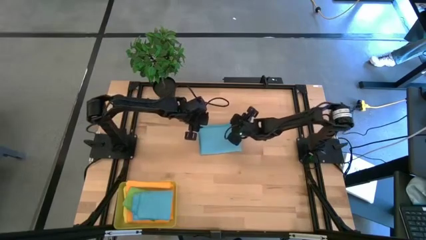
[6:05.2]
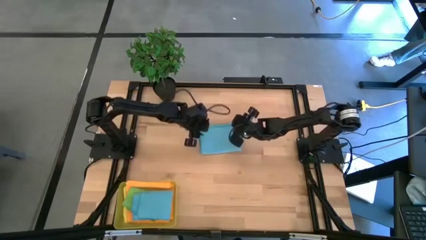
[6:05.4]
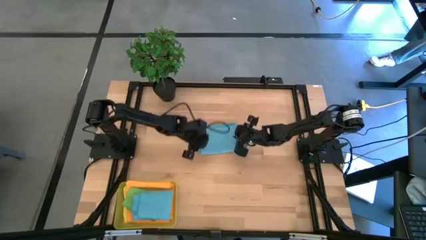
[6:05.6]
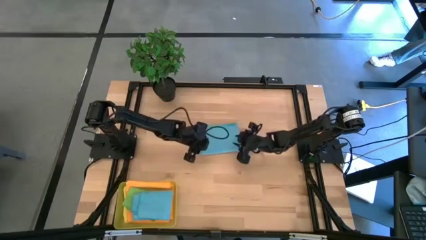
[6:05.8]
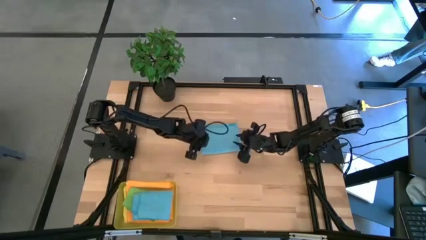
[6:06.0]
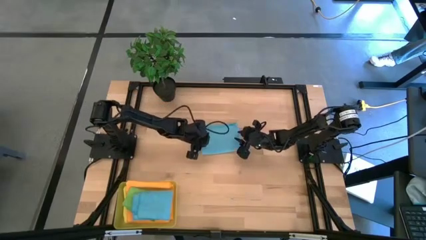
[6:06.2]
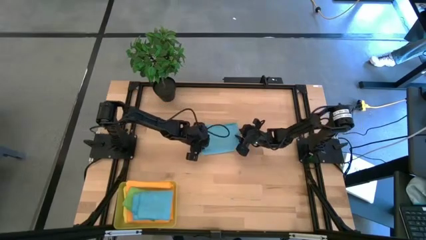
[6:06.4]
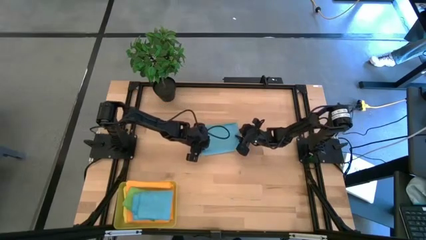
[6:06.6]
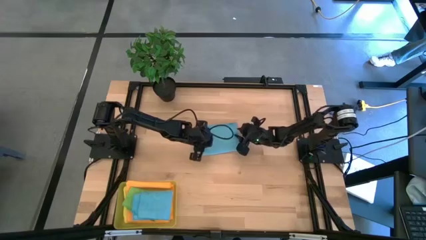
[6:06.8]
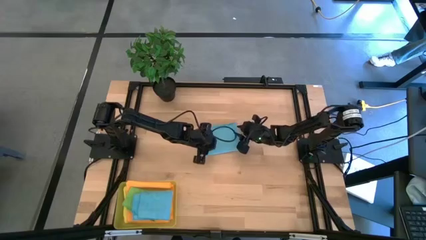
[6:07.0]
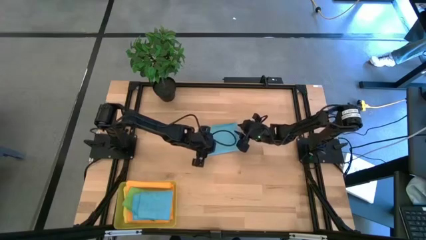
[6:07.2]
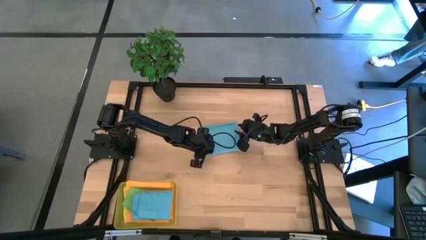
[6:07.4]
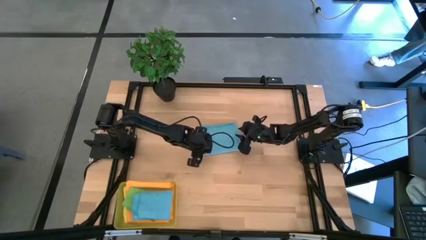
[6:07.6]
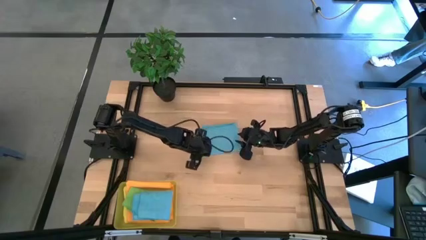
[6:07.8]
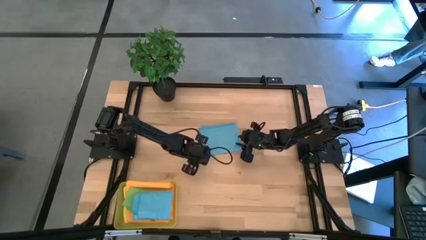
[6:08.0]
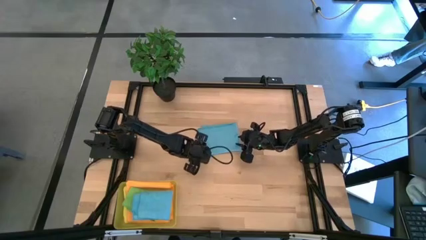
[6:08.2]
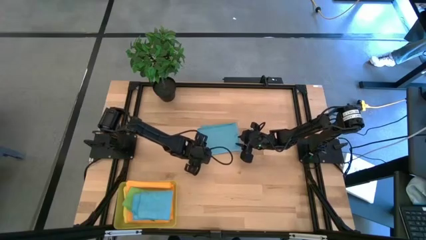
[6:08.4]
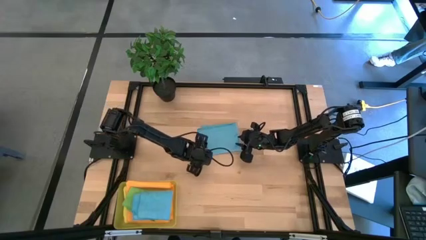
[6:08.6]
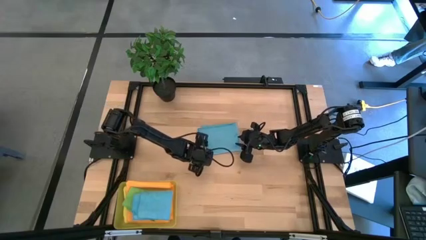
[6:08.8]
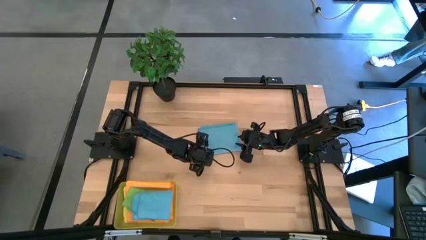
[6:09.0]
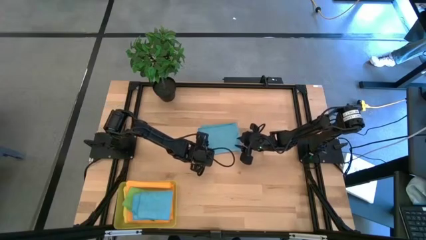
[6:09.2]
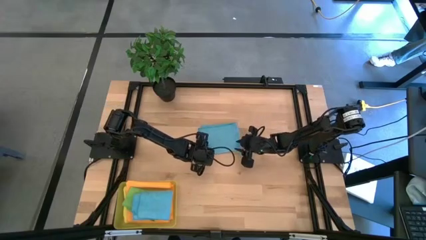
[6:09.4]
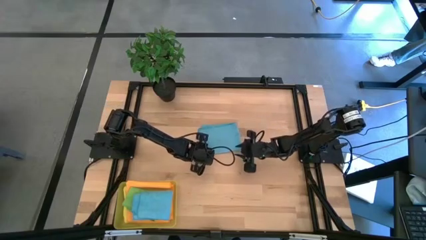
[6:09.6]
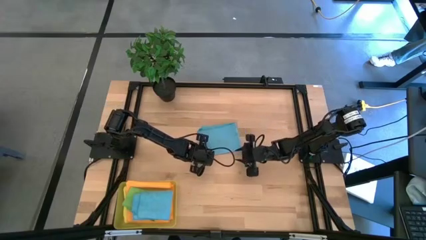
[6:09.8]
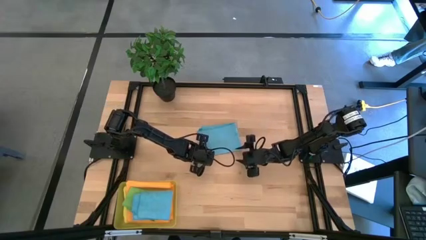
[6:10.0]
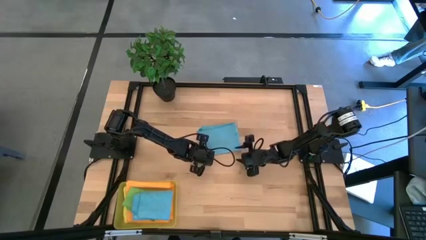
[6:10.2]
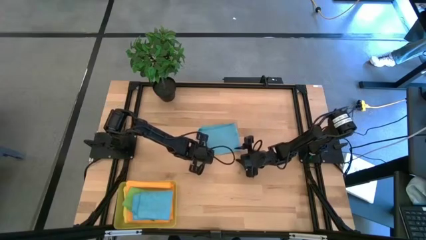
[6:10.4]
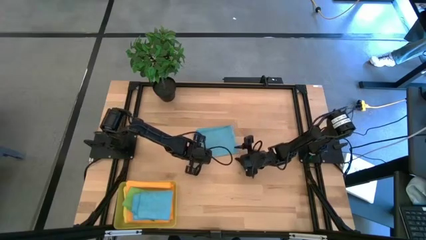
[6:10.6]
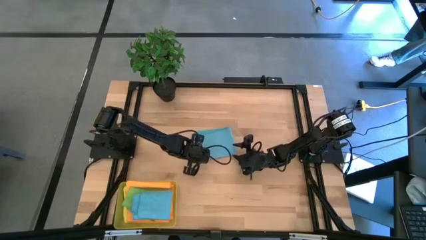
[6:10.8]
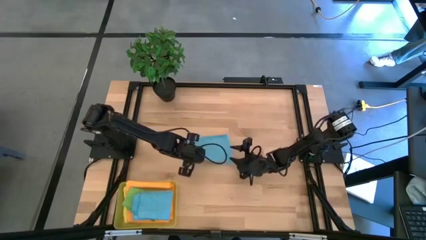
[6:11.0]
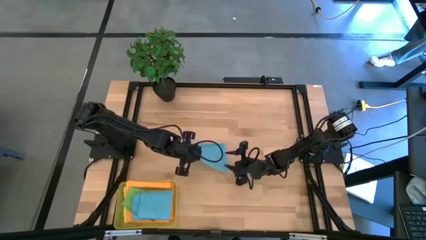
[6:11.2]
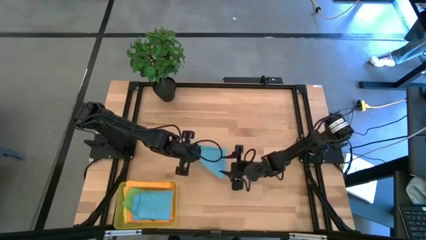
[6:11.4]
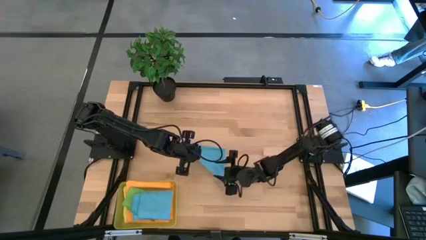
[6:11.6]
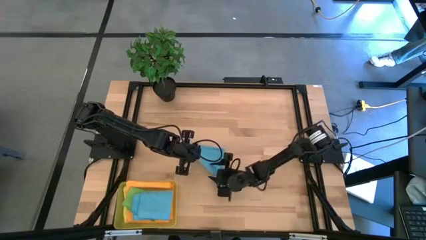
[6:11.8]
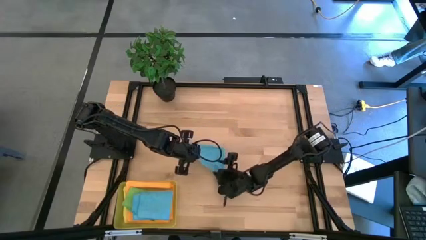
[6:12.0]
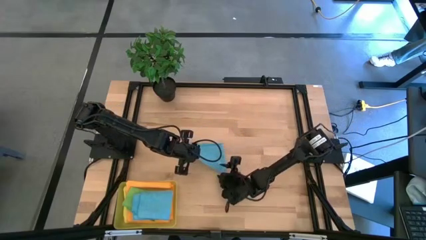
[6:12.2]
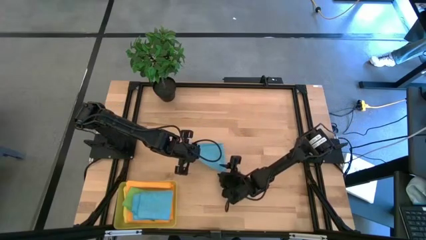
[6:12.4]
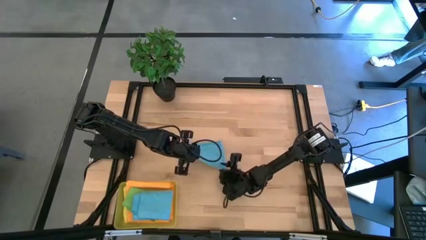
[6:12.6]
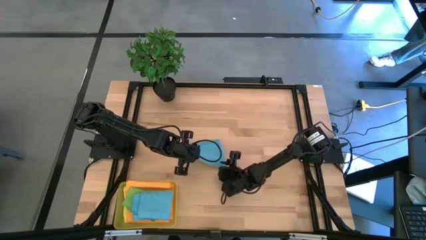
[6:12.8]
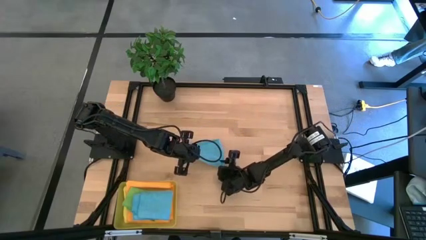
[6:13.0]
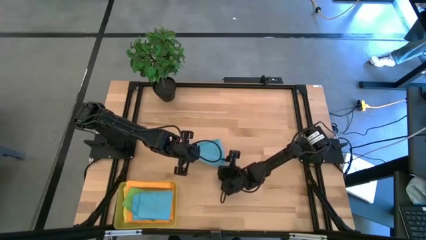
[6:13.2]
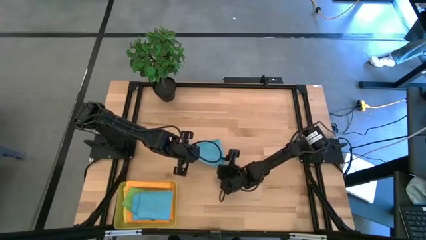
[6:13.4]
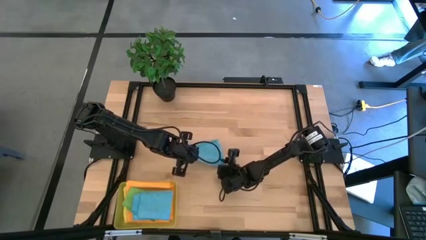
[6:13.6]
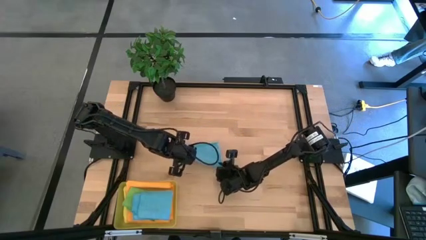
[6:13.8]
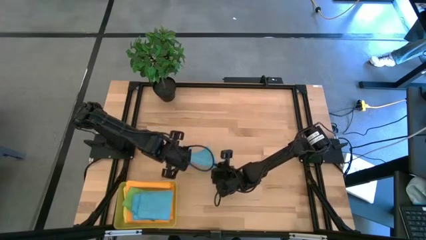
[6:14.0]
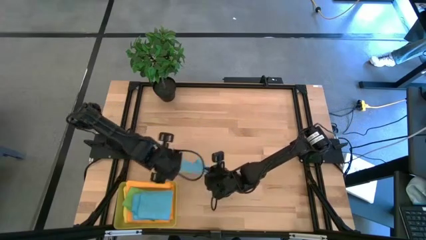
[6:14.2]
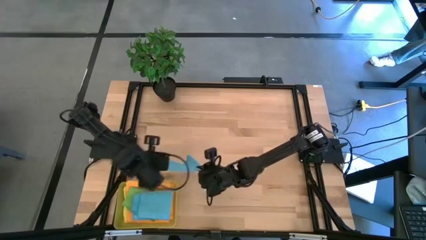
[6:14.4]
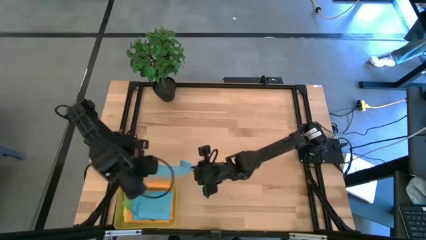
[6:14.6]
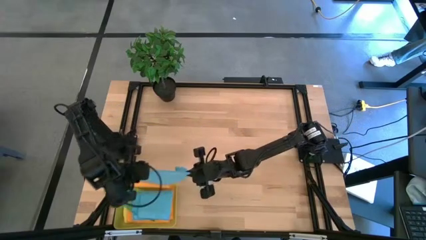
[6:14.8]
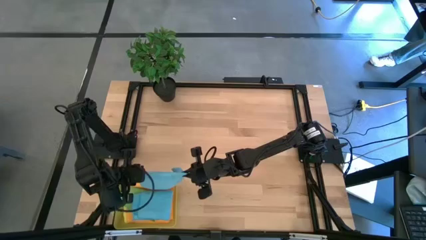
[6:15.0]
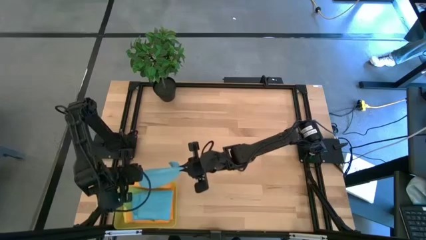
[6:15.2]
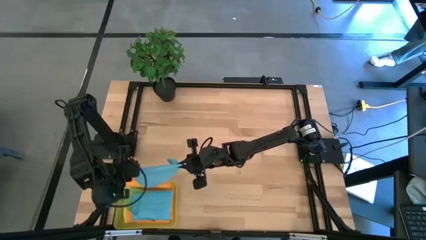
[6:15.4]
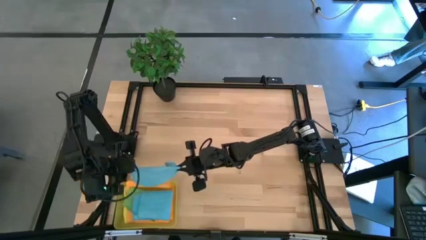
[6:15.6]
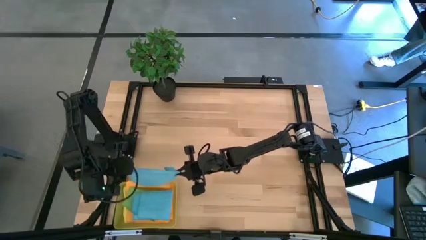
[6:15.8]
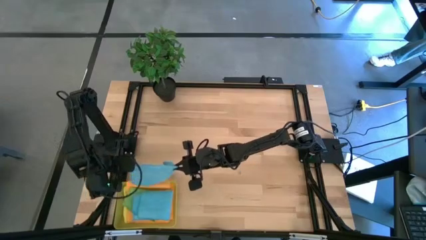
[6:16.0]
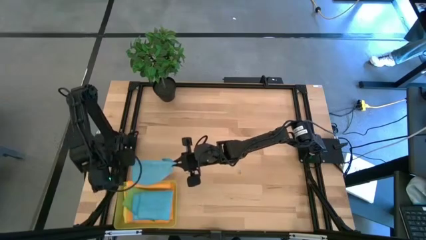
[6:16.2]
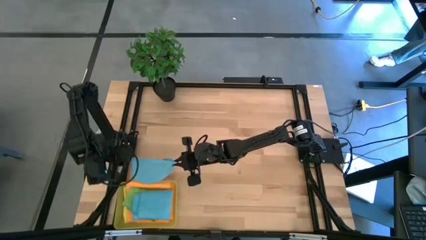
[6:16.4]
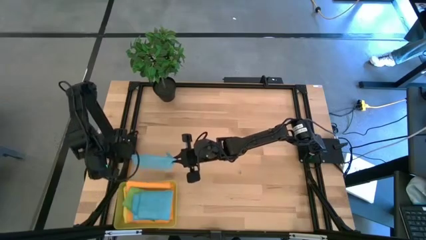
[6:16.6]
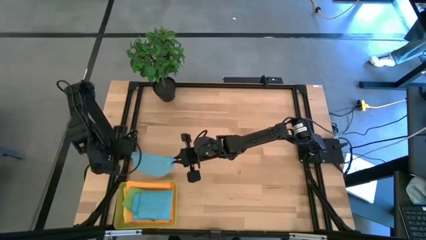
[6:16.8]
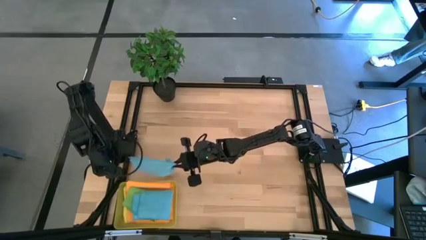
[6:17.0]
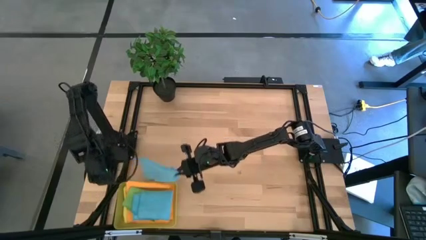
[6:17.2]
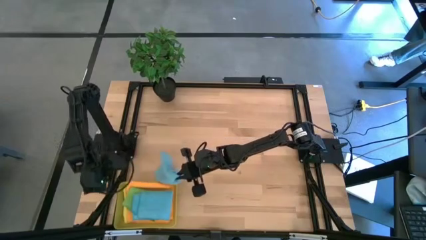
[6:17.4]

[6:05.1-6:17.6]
Task: Fold microfiber towels
Put the folded blue microfiber cloth into the yellow bin

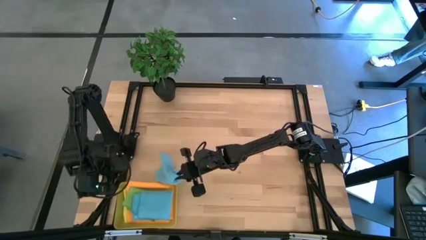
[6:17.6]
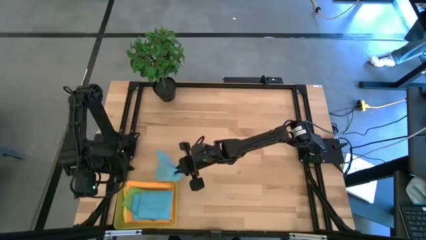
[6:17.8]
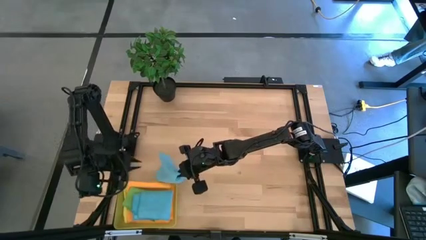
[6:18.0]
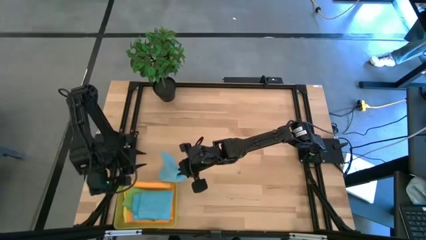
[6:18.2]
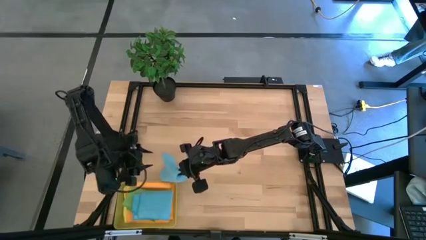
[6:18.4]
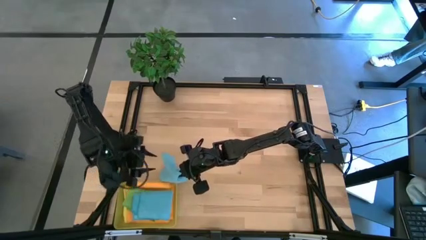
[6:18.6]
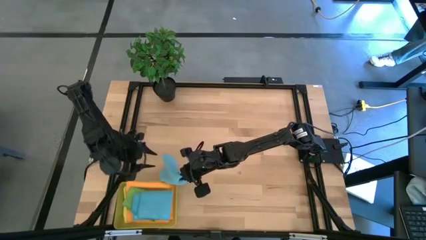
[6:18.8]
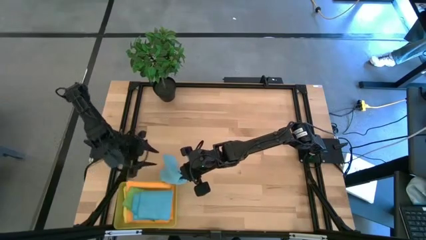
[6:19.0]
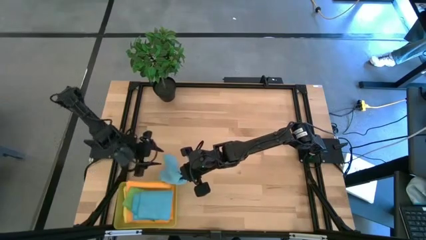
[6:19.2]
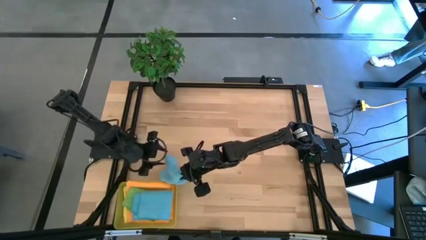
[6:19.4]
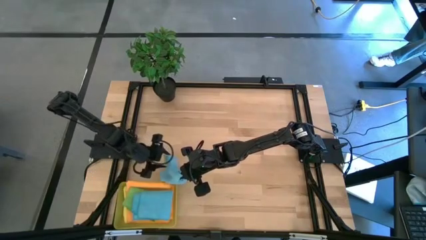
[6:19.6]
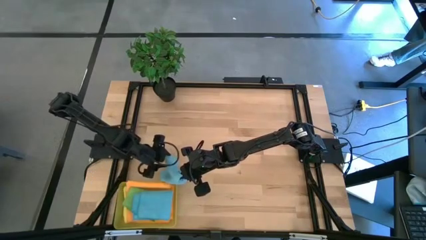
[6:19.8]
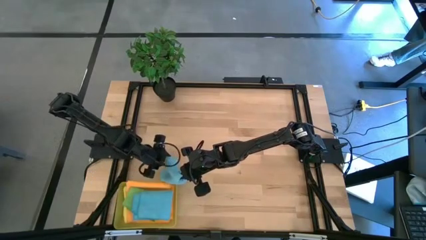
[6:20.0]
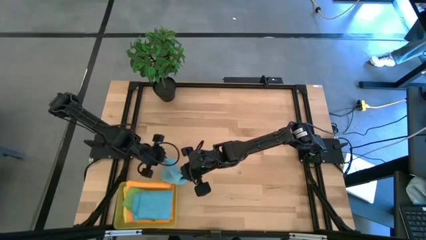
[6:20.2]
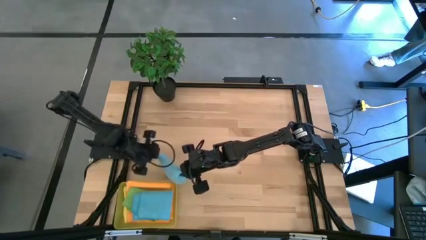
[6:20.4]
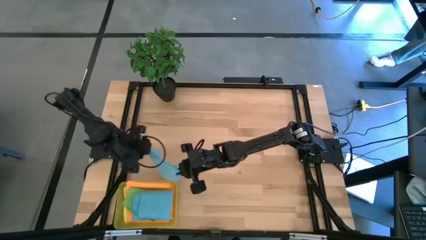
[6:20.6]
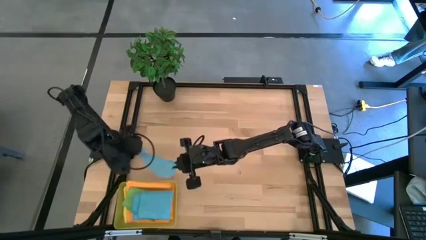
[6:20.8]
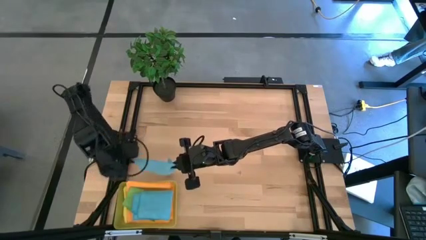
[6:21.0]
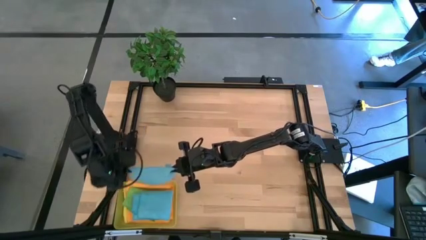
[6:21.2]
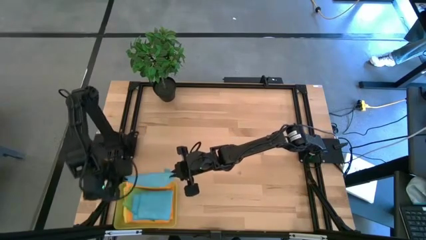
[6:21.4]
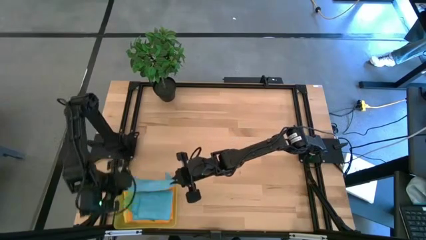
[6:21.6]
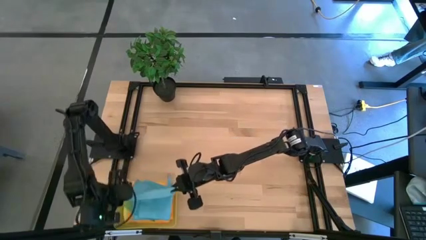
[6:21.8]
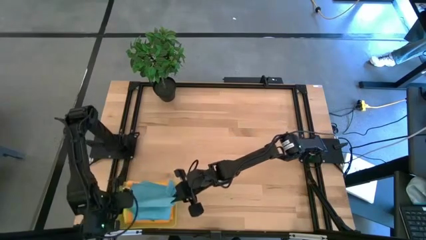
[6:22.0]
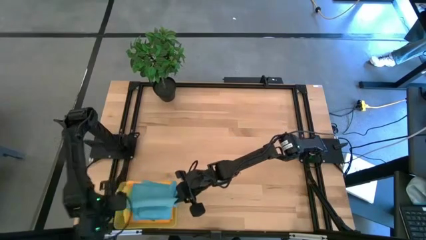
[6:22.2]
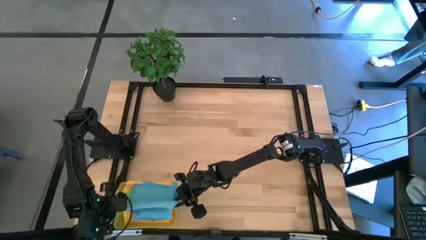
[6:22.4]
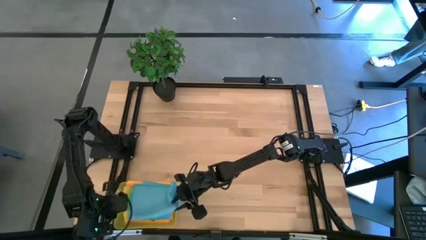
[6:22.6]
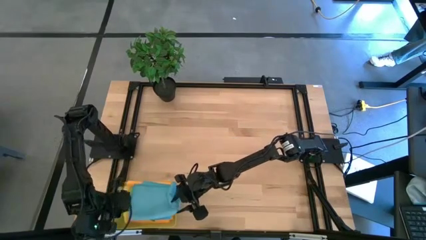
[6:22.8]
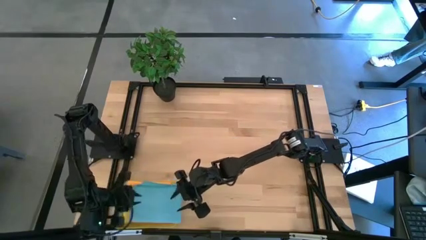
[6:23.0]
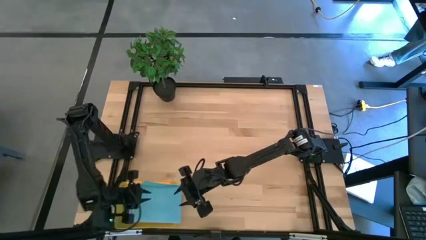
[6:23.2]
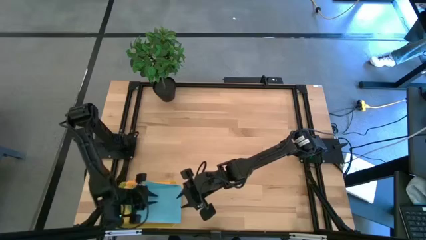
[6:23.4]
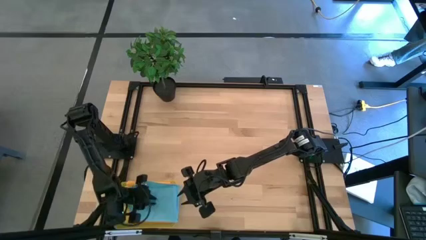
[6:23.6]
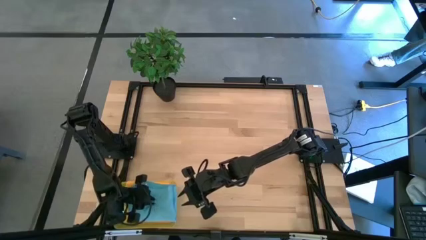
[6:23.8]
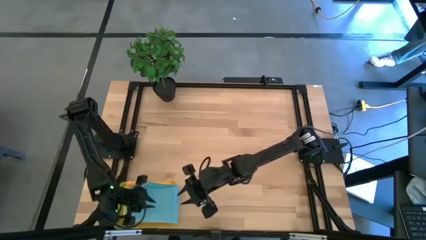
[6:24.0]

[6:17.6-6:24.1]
Put the folded blue microfiber cloth into the yellow bin
